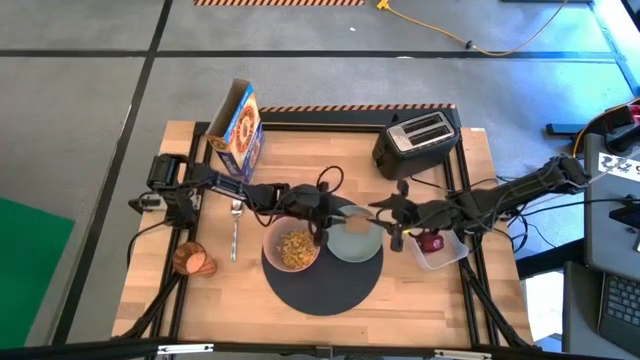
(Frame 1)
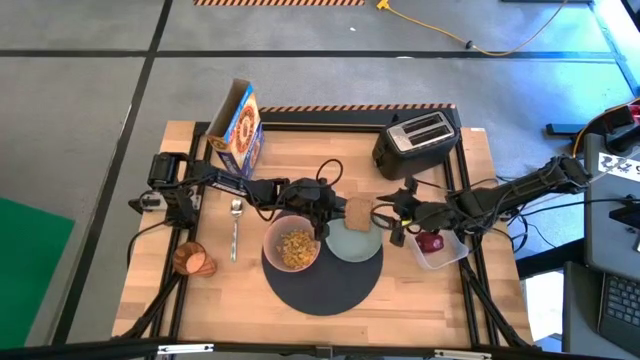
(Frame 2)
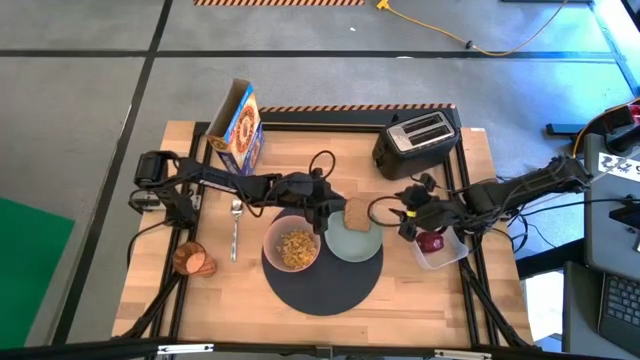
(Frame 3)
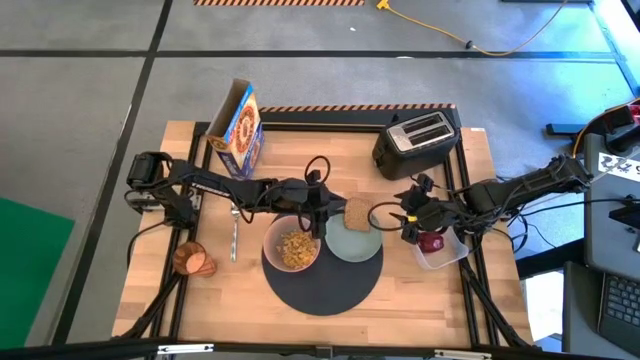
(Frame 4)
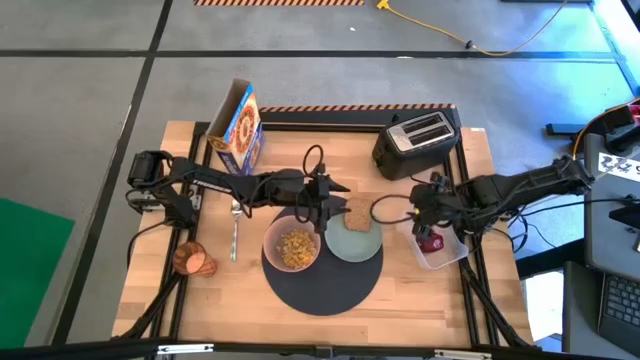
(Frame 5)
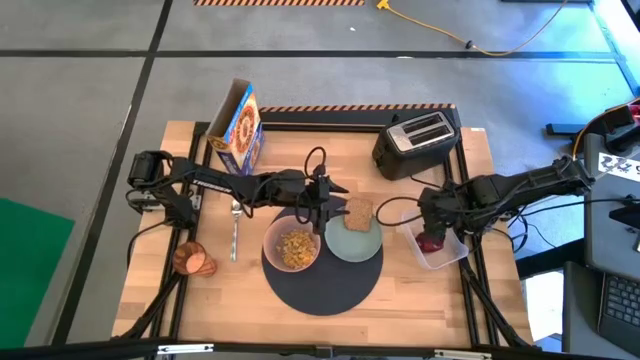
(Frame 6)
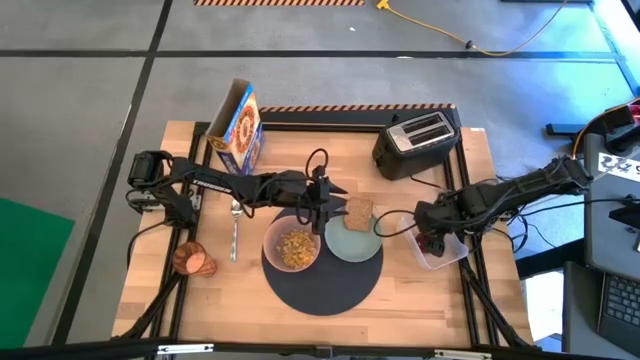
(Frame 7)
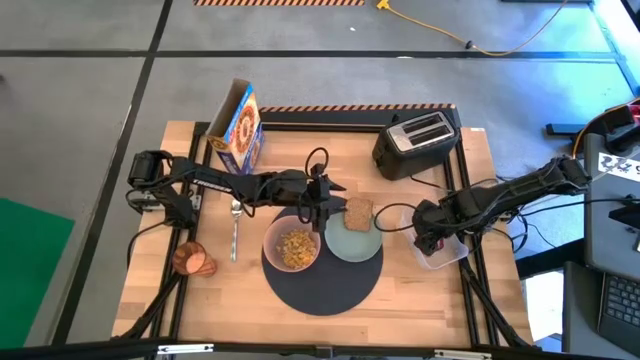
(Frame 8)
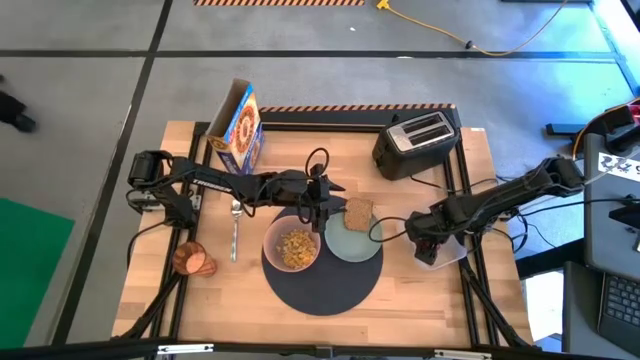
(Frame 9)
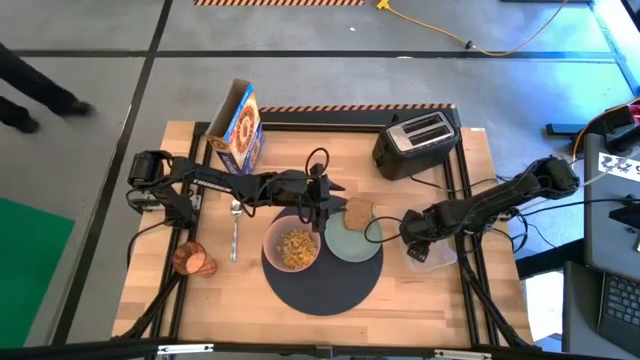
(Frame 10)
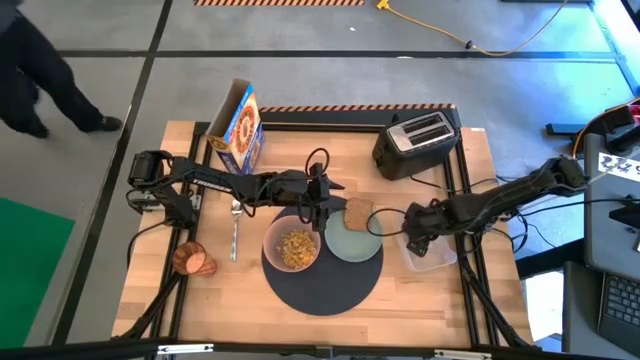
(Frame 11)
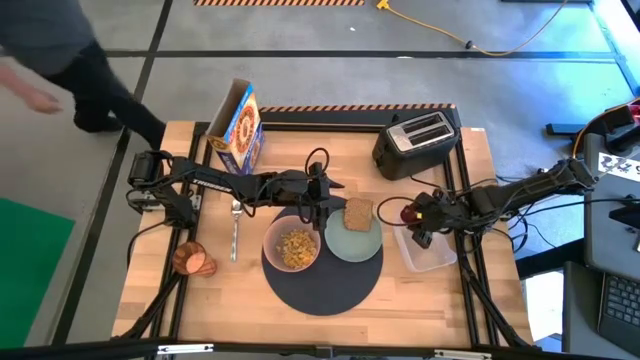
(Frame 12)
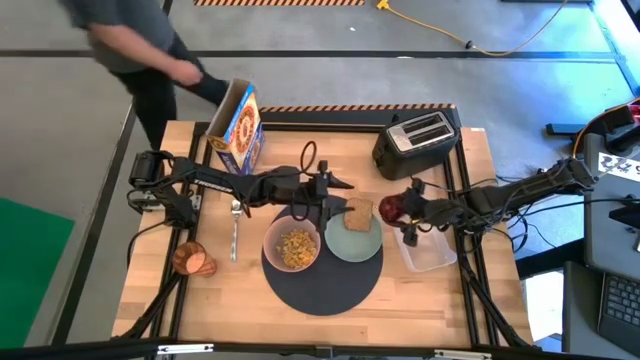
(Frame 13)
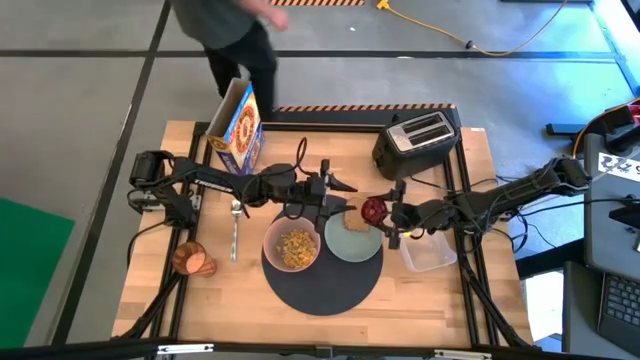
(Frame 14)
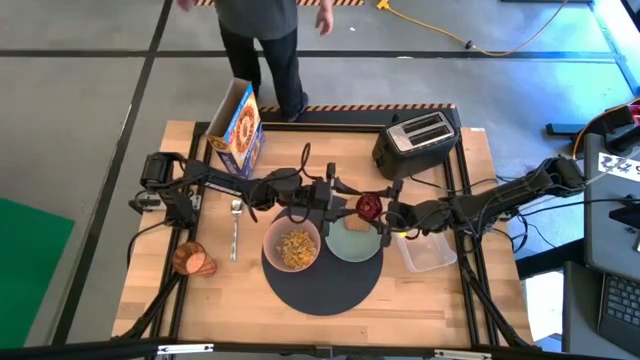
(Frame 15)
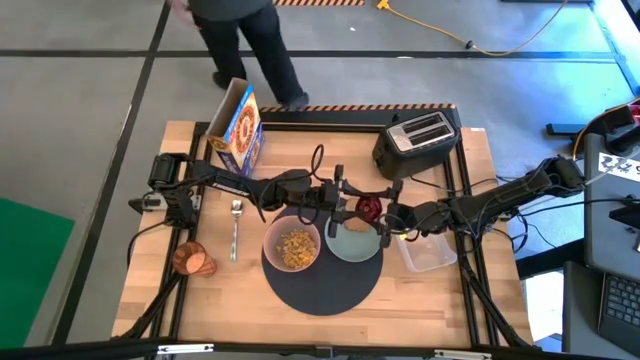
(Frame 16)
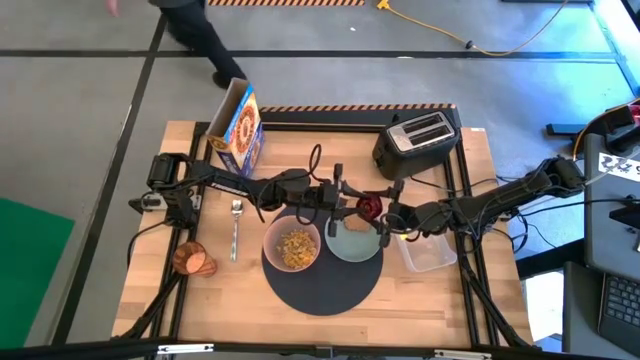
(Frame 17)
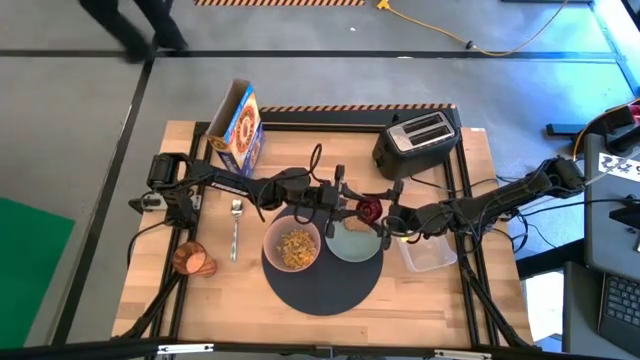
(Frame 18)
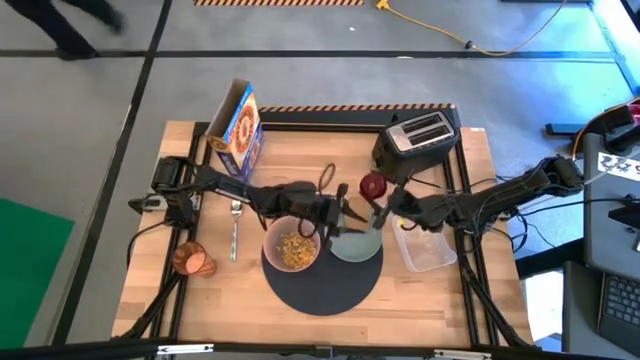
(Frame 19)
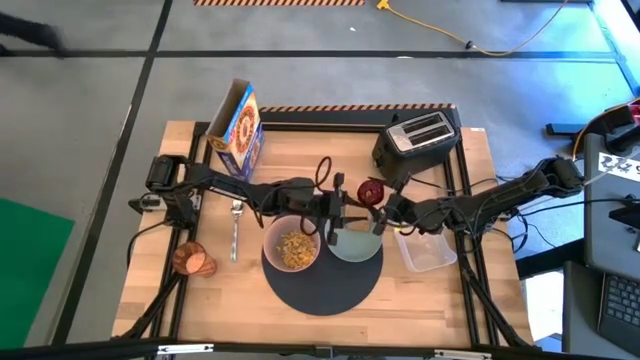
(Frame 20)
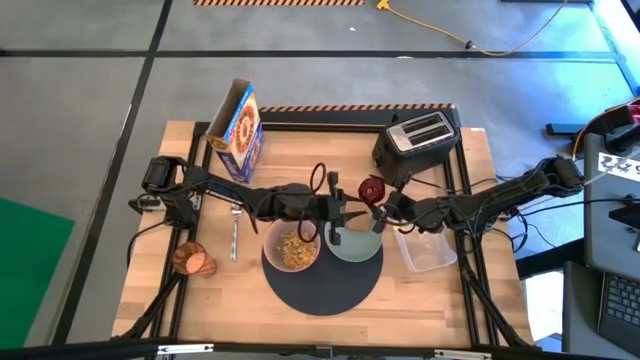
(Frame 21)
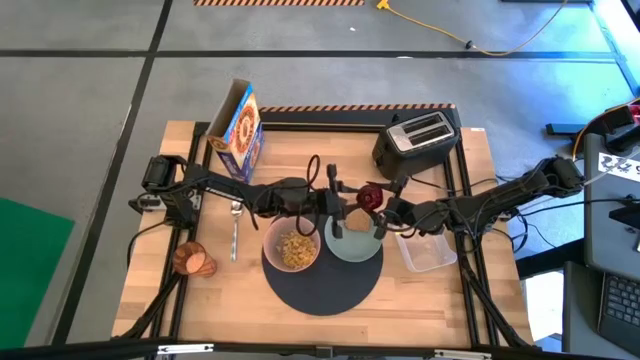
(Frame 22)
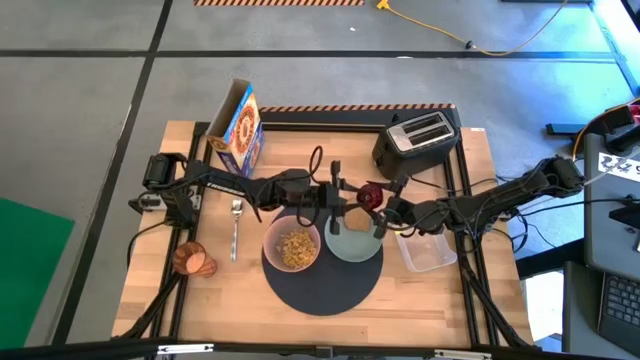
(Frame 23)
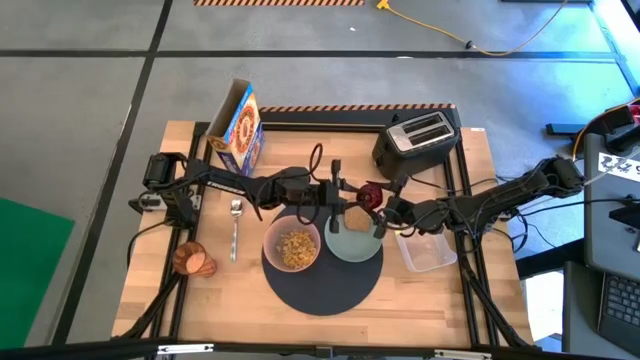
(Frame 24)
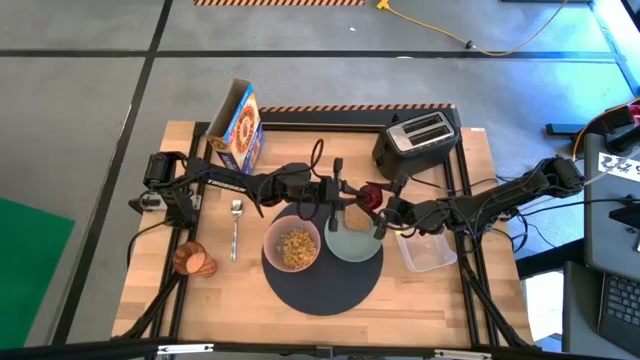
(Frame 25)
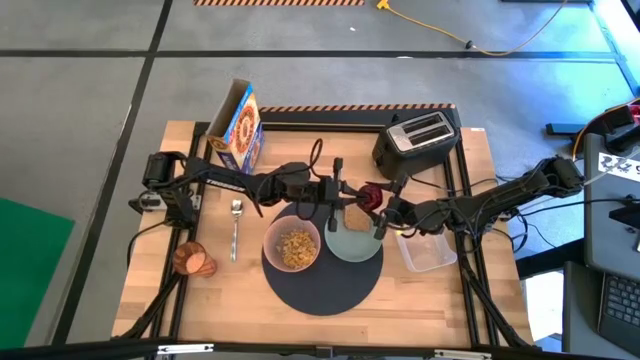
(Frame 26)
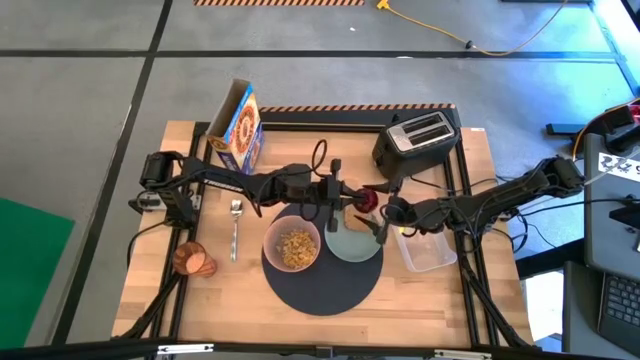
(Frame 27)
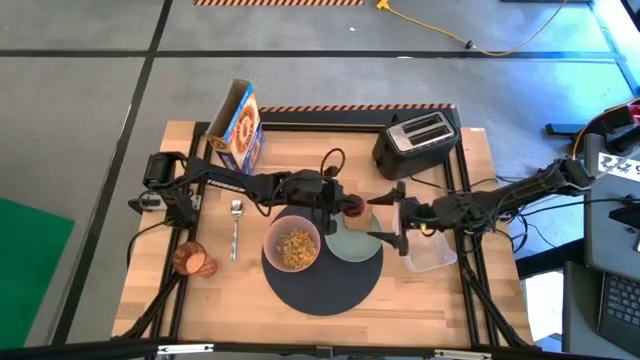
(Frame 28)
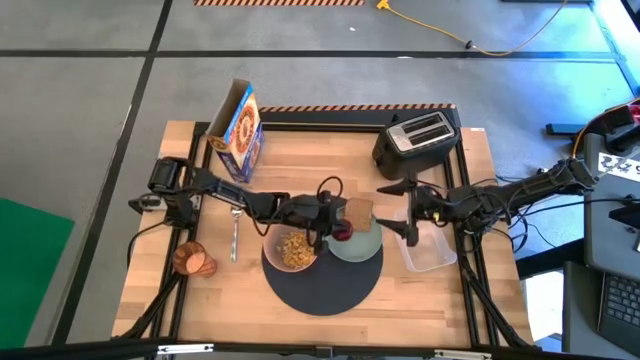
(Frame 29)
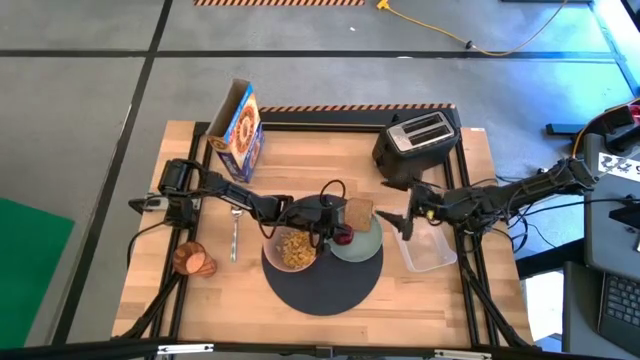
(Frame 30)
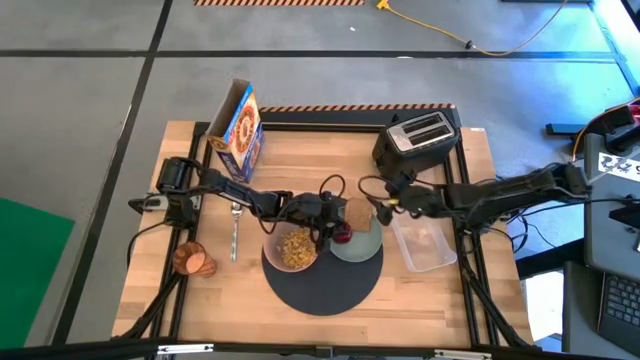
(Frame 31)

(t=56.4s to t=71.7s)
Task: Arrange a breakfast setting
Put the red apple from the white bin on the green plate to the bottom left of the toasted bread

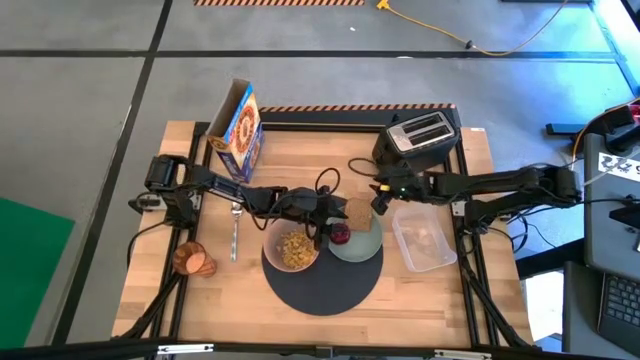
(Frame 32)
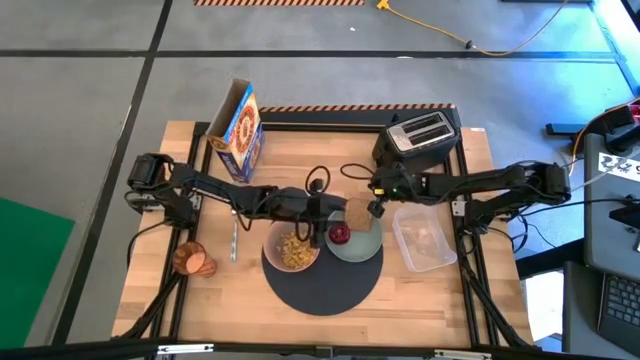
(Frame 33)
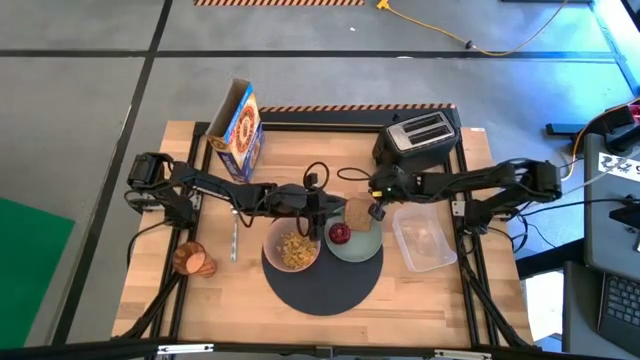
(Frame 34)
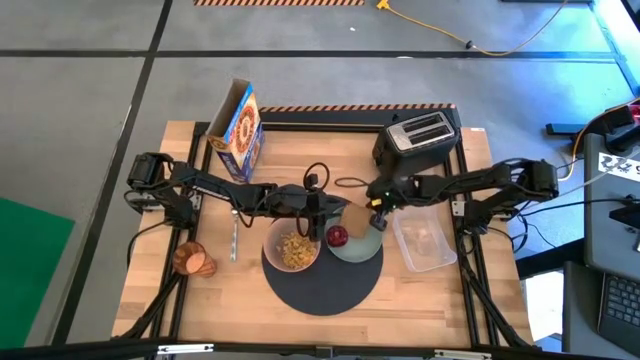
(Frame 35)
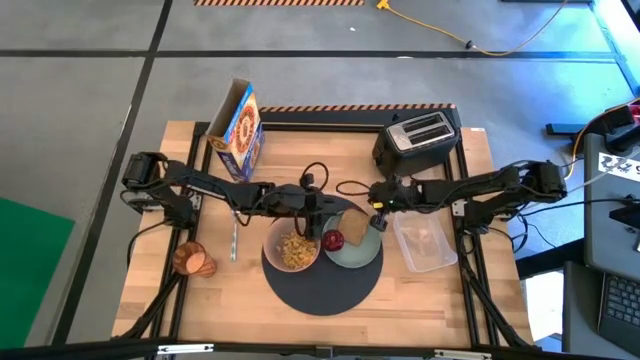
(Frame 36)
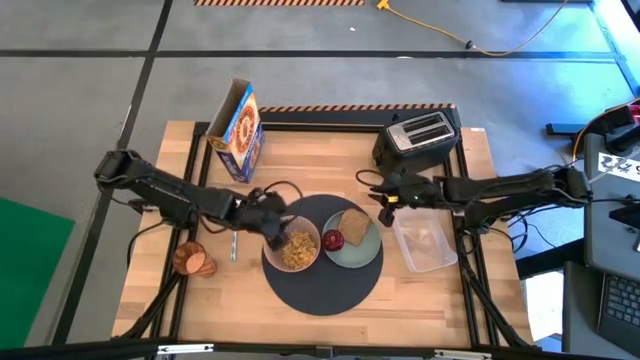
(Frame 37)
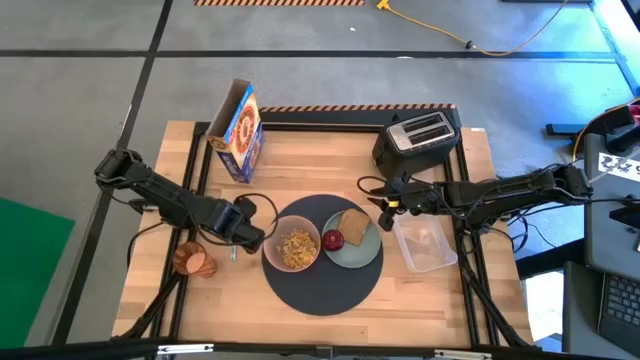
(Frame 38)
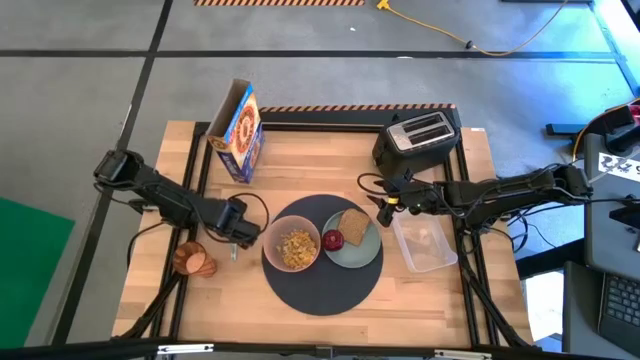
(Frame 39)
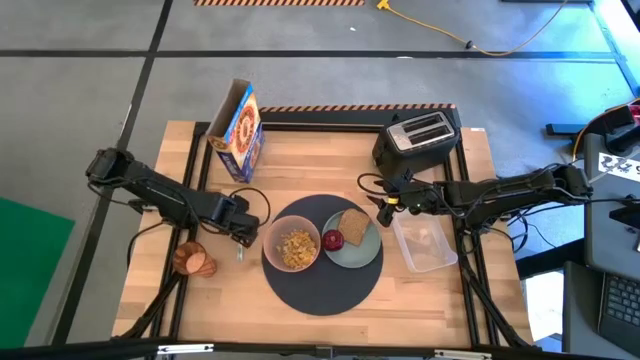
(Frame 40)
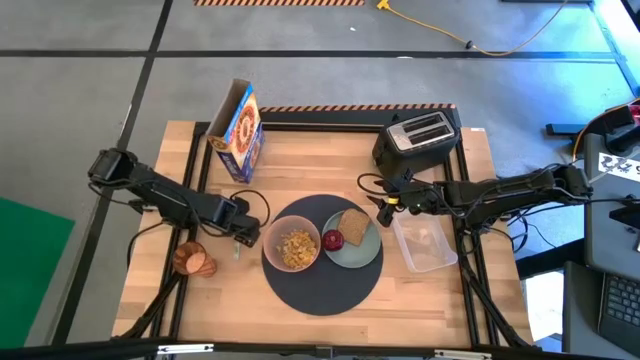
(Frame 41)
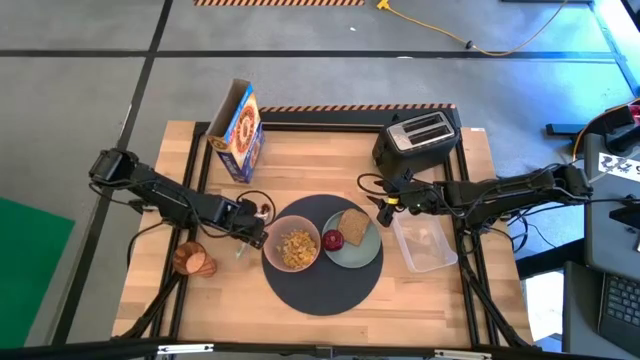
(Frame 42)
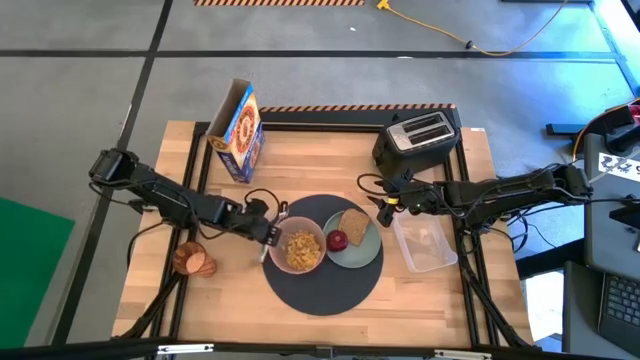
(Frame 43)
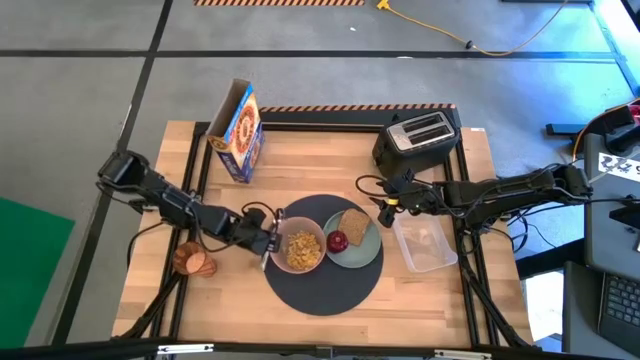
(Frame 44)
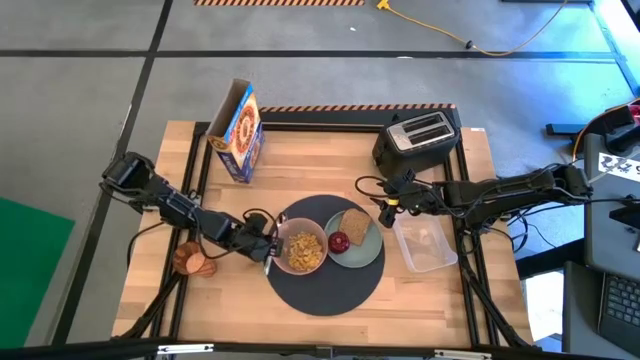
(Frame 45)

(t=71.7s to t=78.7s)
Put the white and green spoon on the blue placemat to the left of the orange bowl
